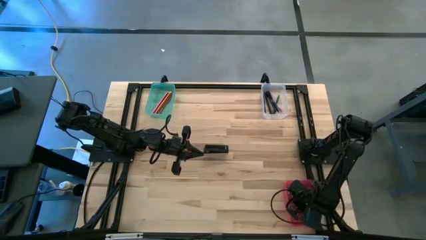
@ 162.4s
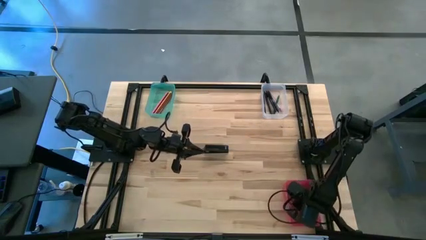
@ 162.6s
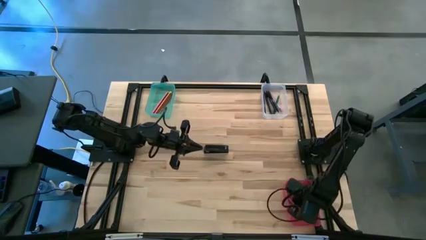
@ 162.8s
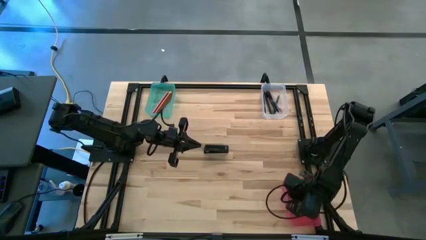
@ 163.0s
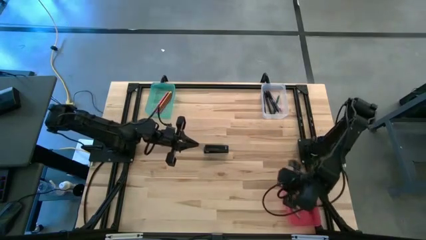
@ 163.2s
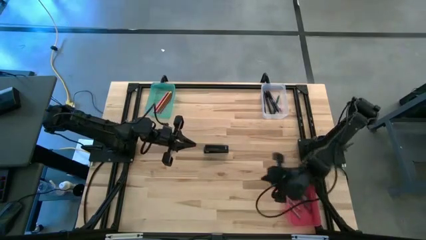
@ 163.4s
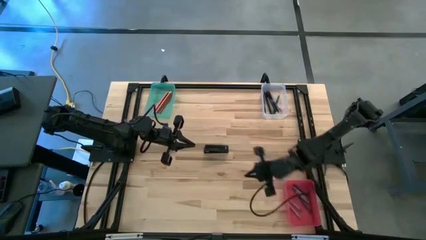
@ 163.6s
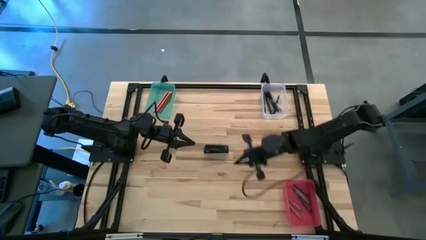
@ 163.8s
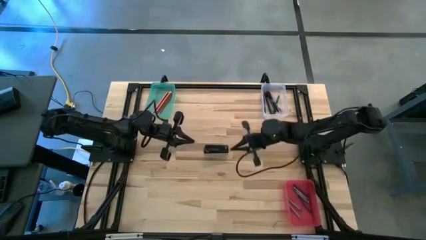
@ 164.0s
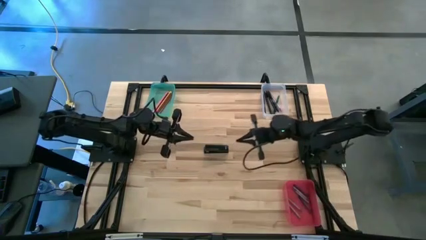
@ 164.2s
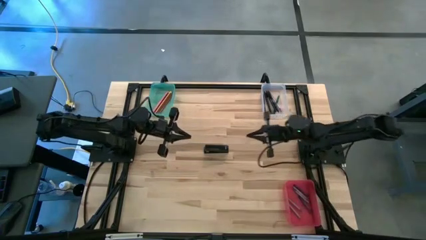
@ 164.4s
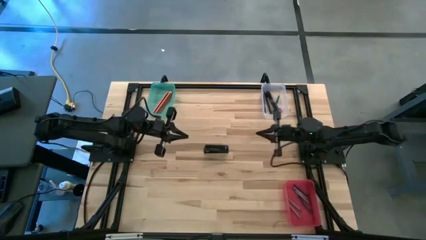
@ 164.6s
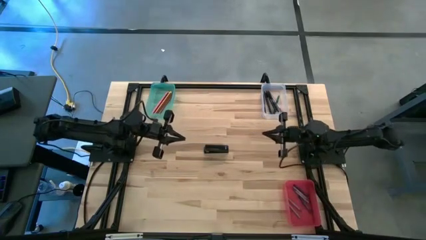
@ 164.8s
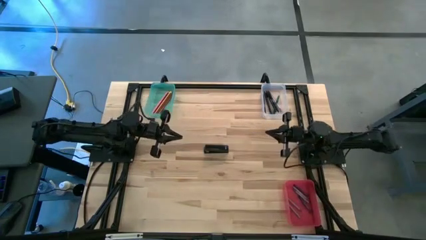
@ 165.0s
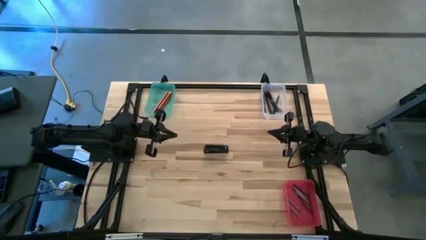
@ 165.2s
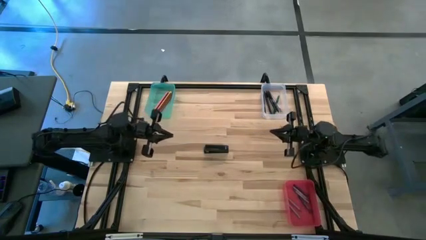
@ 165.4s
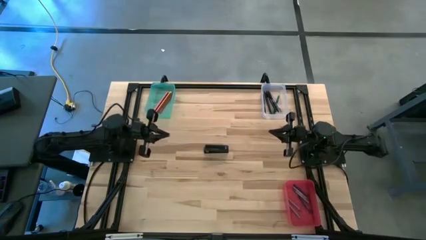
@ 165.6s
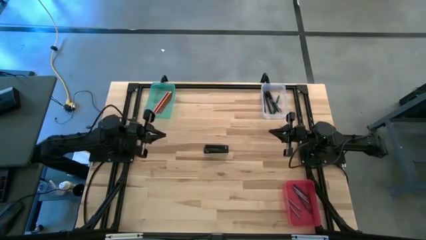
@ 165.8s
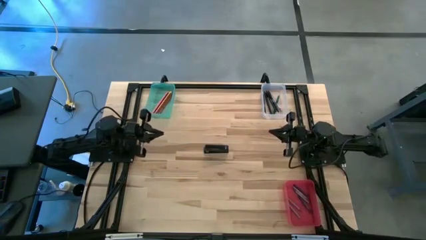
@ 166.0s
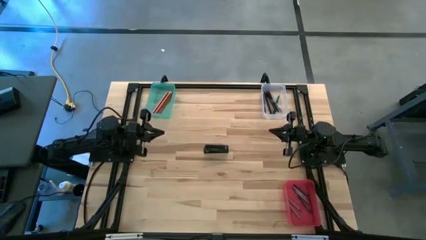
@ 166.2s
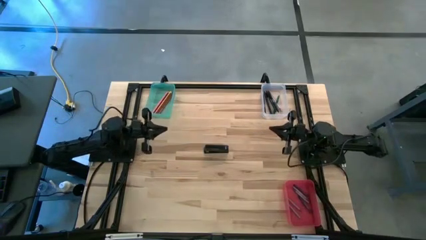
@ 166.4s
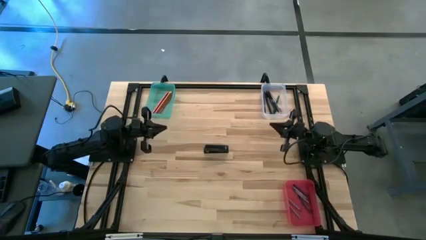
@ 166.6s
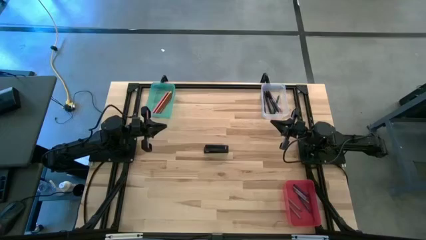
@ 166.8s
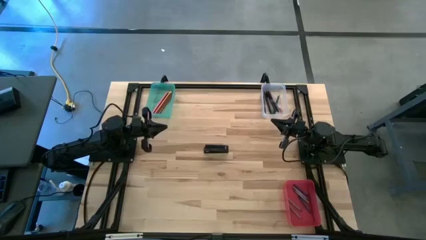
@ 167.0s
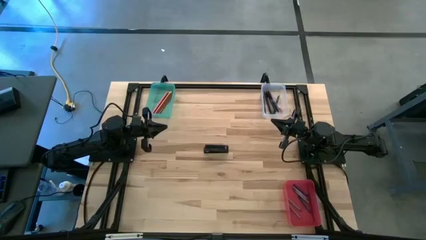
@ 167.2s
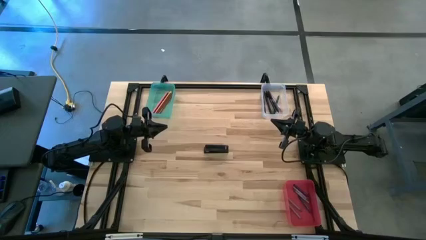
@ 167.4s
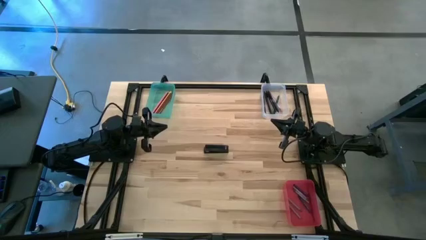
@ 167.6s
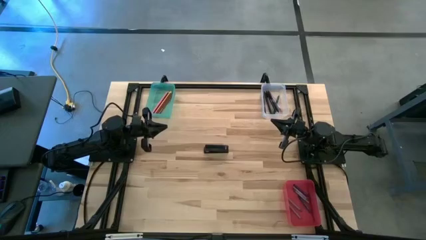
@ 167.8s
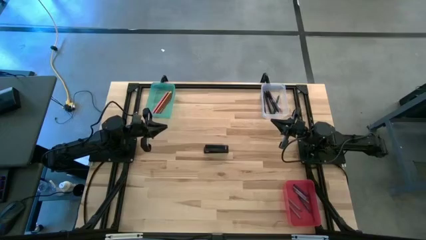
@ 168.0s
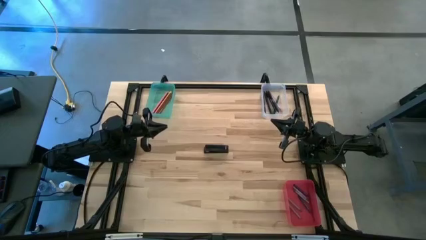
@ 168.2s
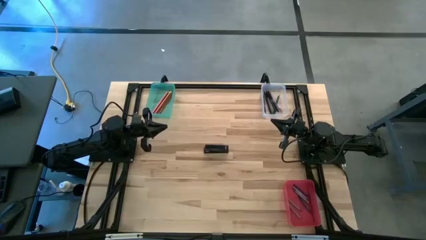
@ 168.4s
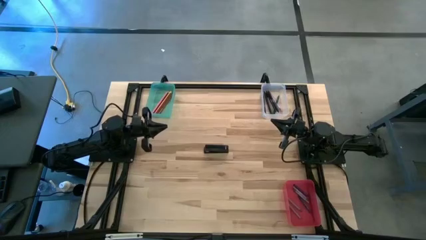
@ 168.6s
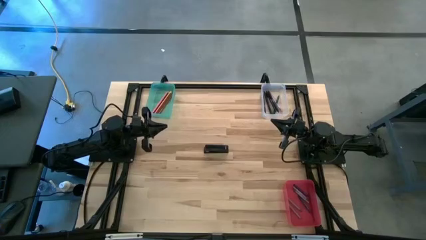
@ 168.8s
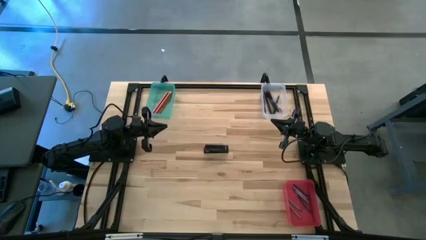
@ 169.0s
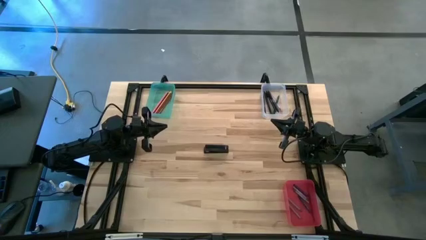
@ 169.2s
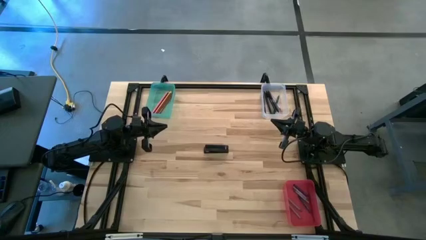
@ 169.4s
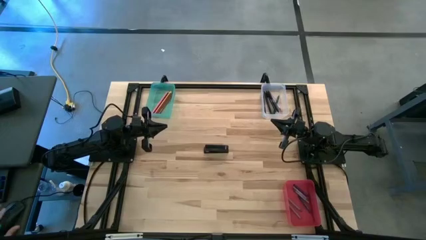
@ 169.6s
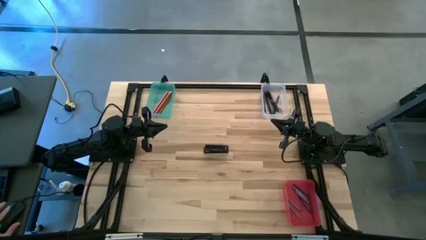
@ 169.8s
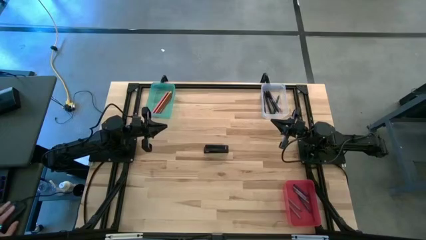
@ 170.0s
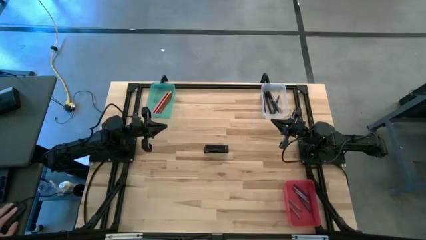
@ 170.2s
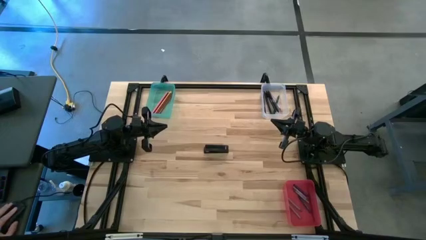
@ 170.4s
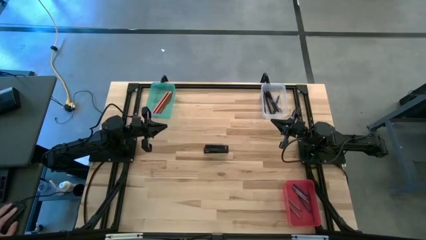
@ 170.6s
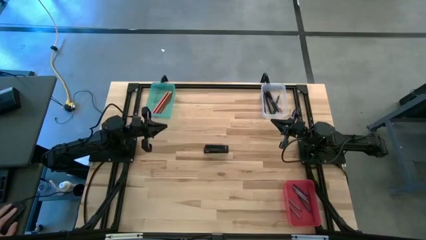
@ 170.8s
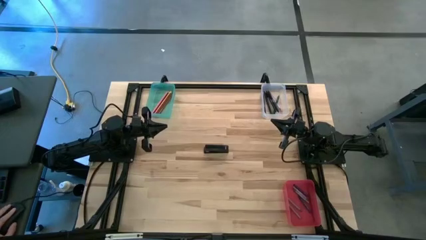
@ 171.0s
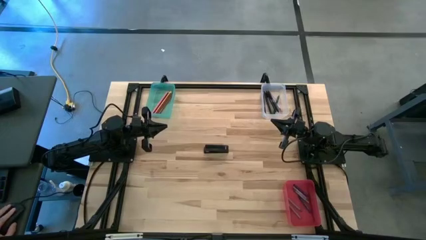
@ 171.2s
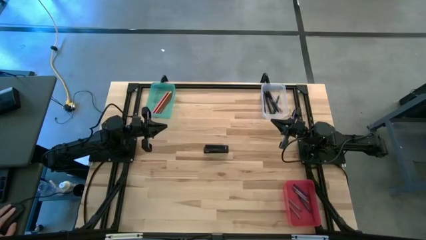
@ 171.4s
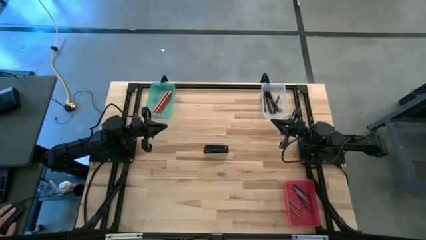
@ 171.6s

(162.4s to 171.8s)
Task: Sort crayons/erasers/pens/pencils in bins
Return to Home Position

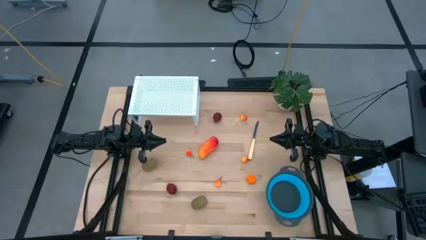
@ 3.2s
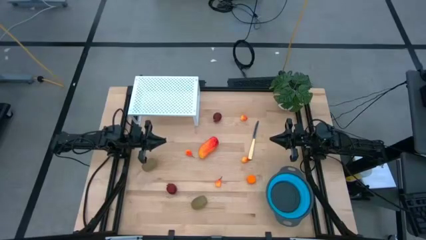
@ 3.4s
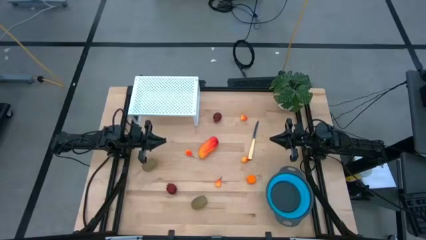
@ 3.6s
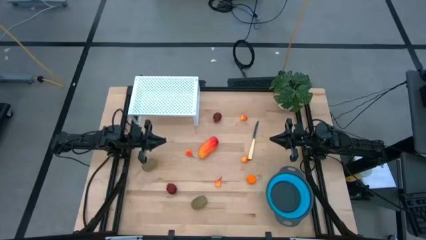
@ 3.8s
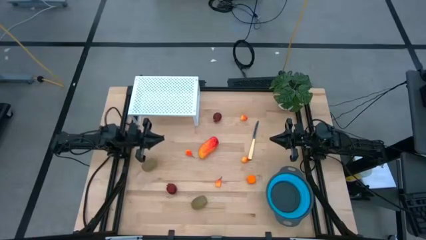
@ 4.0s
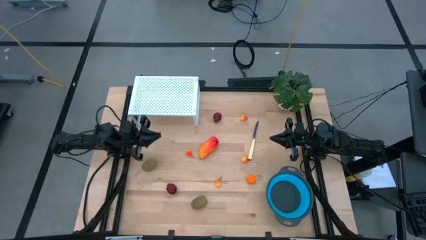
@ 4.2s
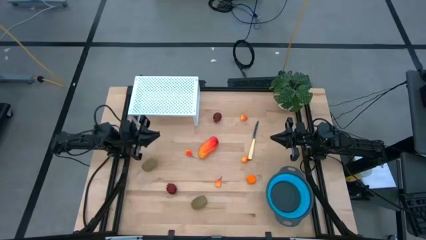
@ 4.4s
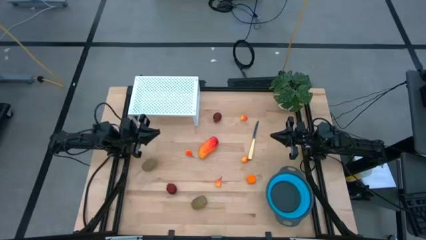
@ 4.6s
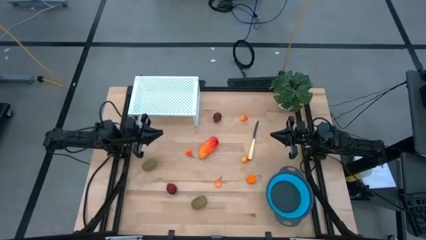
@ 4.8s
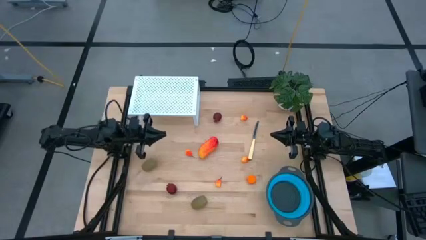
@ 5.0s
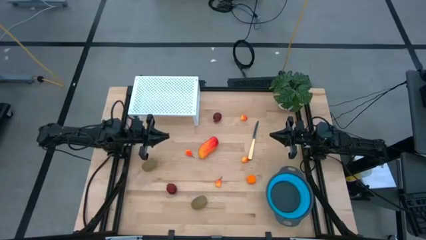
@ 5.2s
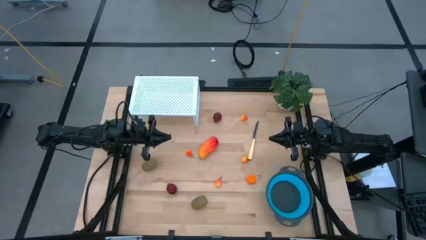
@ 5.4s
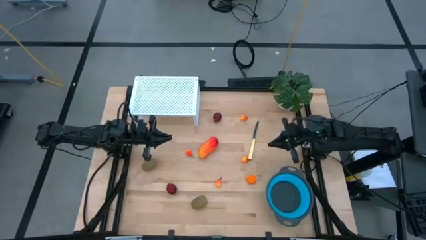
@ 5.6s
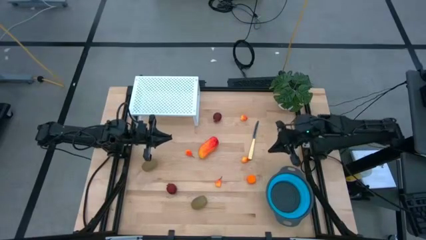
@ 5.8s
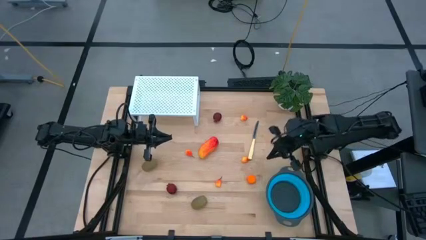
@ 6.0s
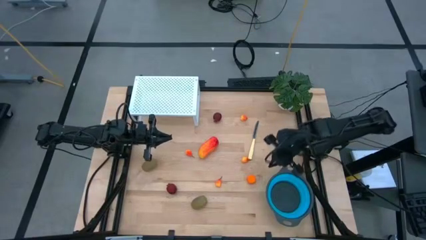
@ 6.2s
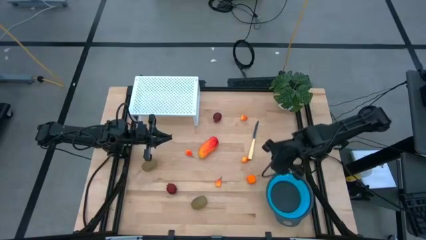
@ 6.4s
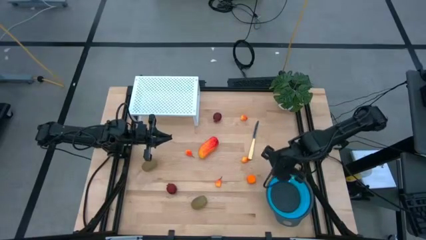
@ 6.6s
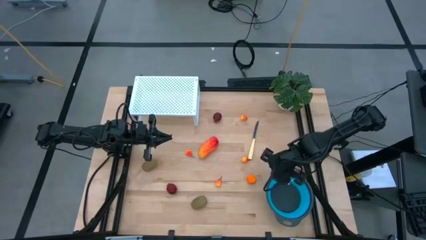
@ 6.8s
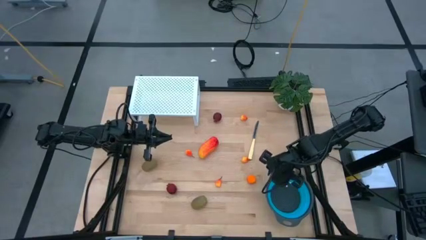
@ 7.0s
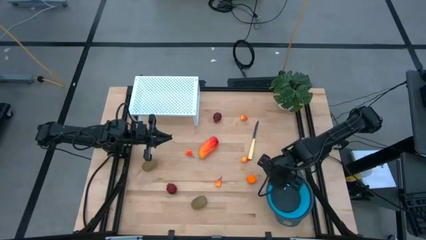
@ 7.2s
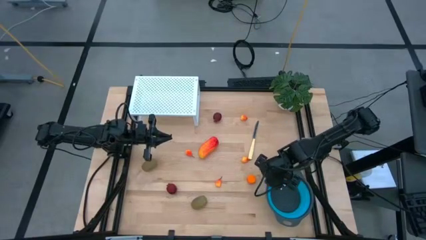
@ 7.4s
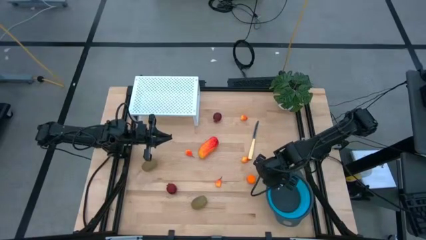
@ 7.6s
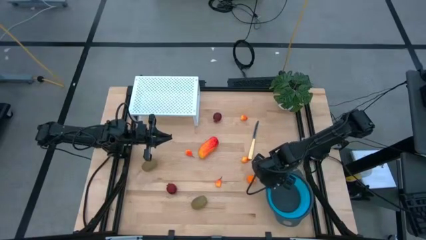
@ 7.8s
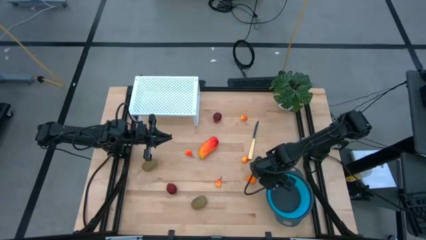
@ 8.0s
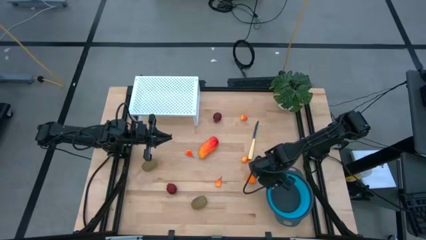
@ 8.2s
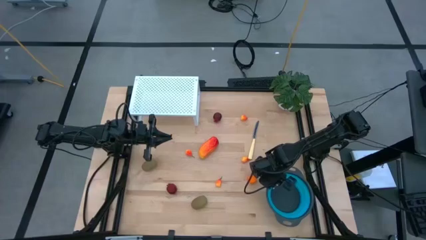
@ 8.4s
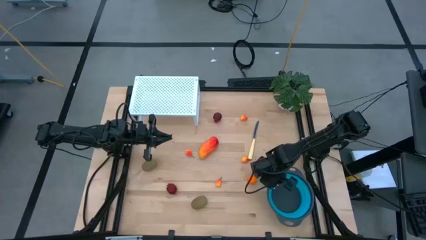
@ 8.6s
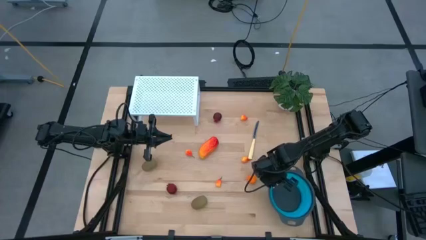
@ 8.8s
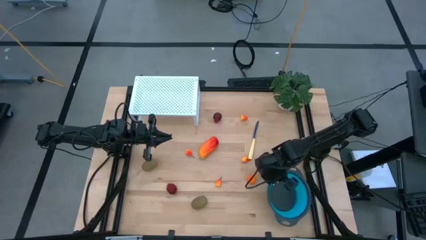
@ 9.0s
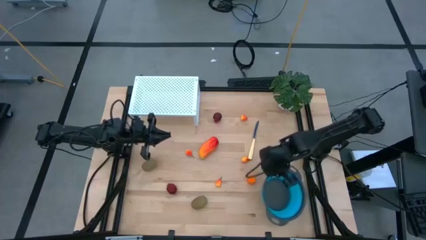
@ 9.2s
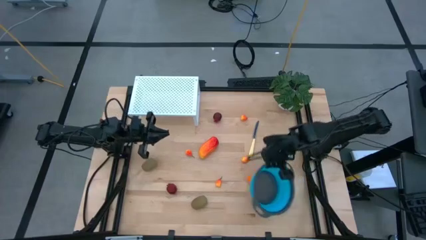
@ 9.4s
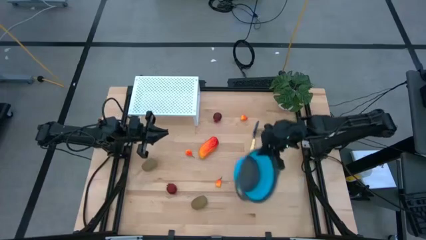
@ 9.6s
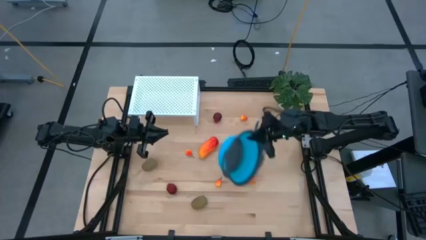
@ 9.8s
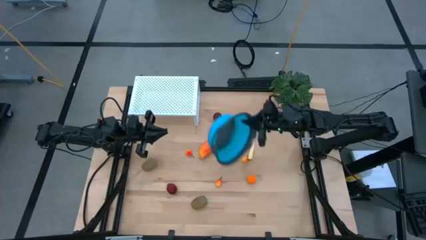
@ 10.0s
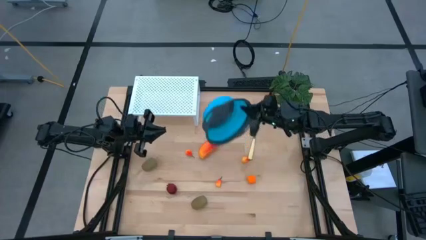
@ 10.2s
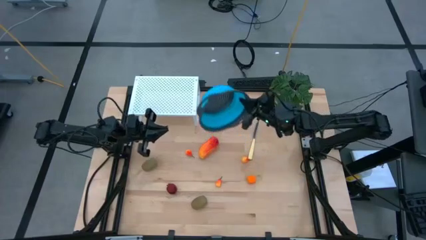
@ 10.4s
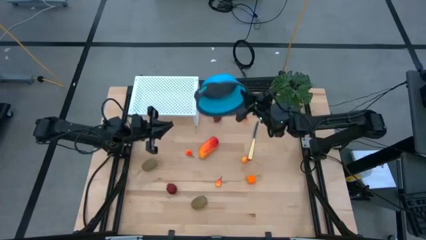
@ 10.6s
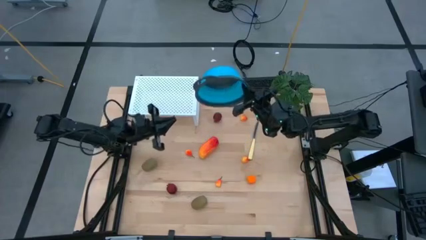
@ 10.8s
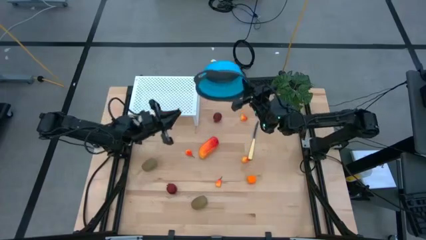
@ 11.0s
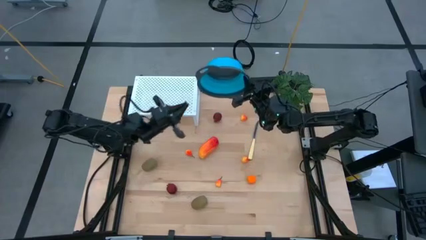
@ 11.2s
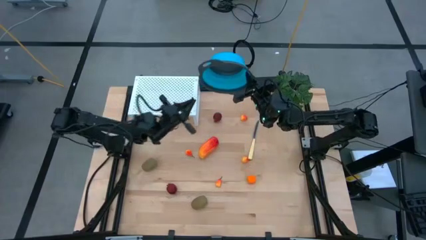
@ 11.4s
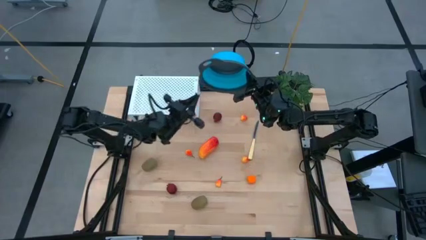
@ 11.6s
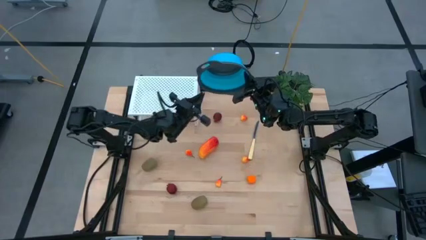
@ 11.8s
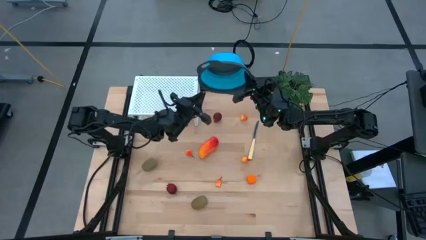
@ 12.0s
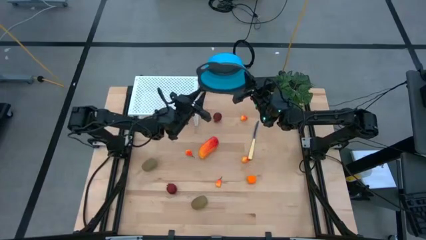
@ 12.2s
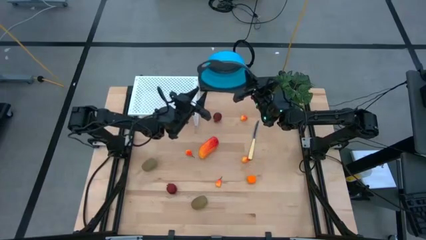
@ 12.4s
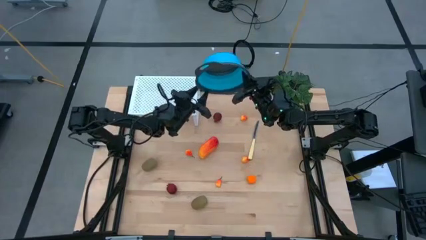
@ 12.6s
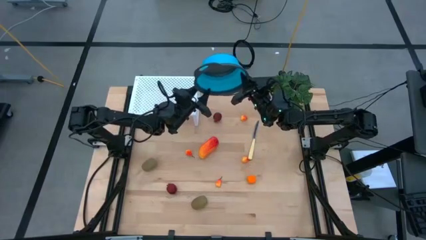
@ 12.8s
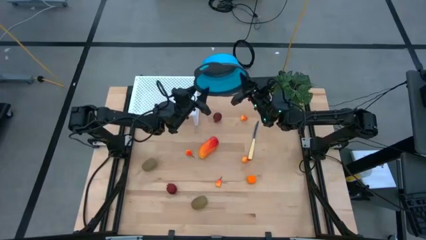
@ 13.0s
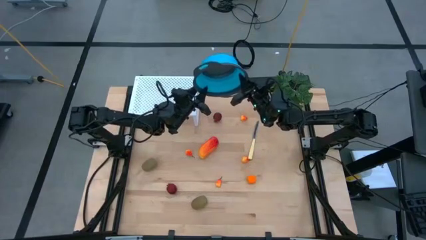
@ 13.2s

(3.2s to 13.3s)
Task: Pick & Place Fruit
Put the blue blue strainer bowl on the shelf
